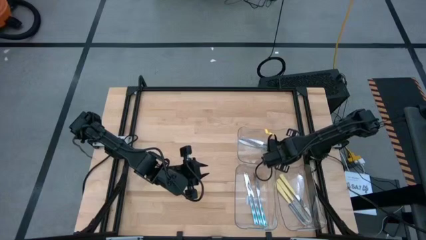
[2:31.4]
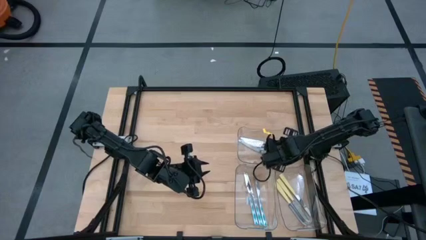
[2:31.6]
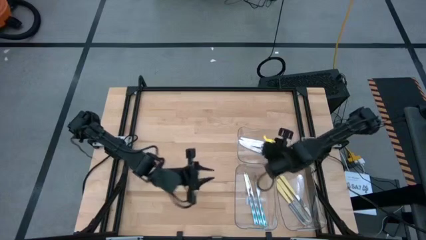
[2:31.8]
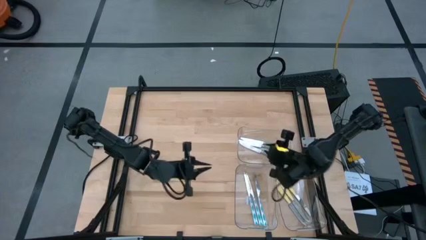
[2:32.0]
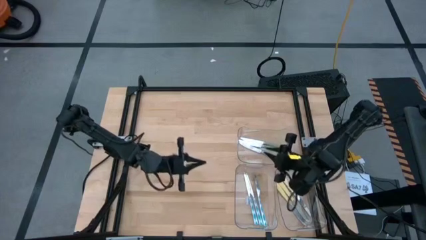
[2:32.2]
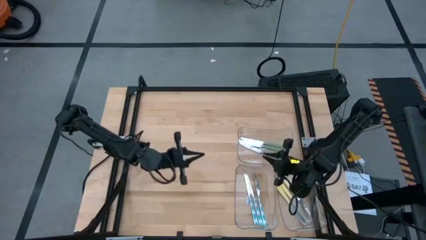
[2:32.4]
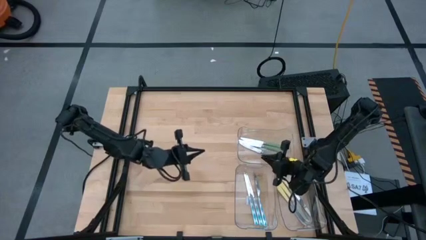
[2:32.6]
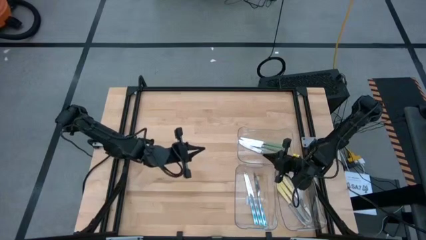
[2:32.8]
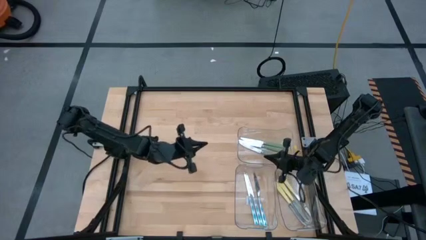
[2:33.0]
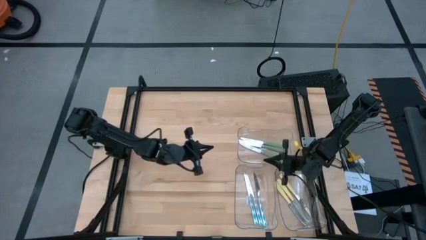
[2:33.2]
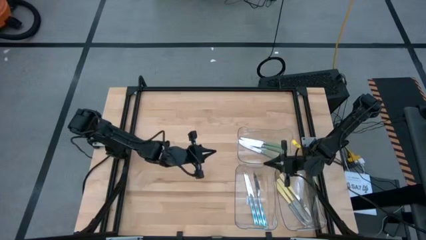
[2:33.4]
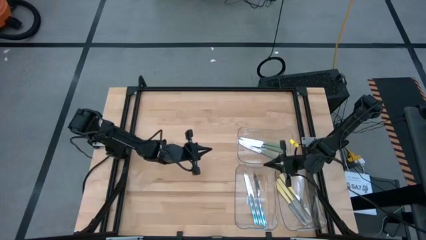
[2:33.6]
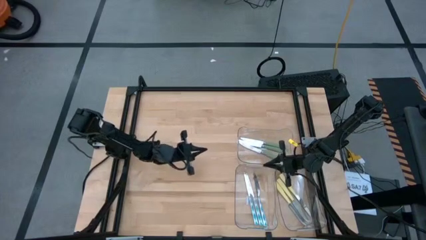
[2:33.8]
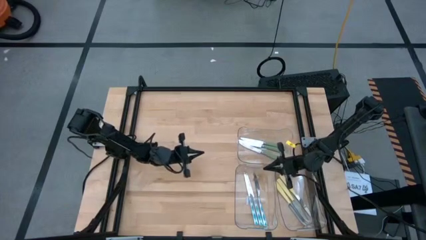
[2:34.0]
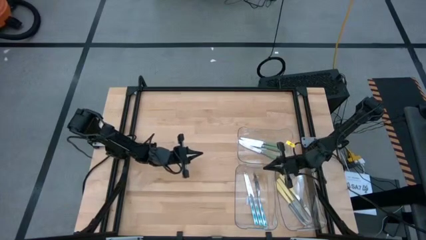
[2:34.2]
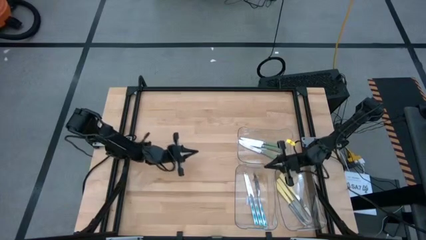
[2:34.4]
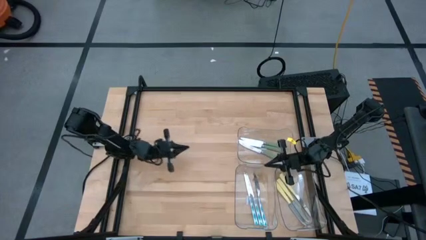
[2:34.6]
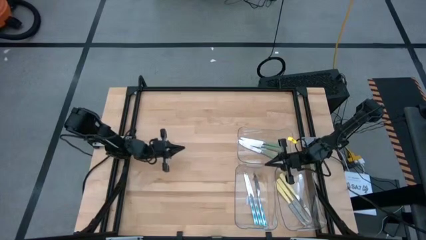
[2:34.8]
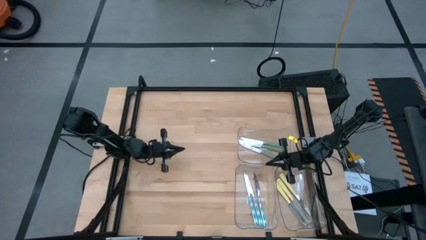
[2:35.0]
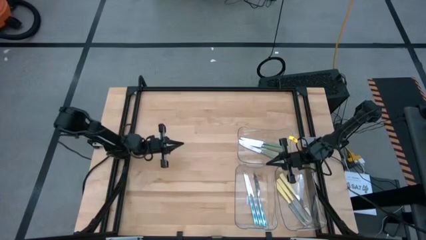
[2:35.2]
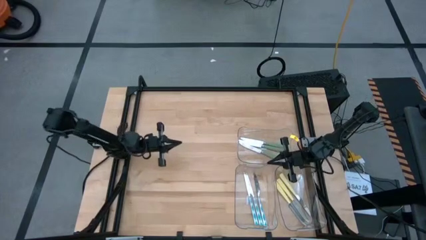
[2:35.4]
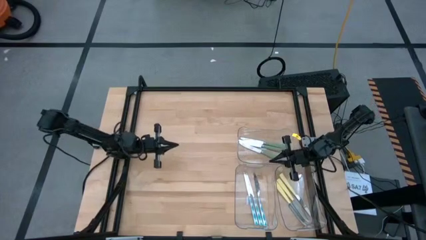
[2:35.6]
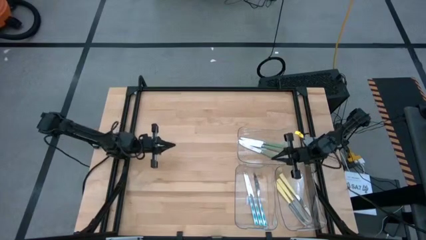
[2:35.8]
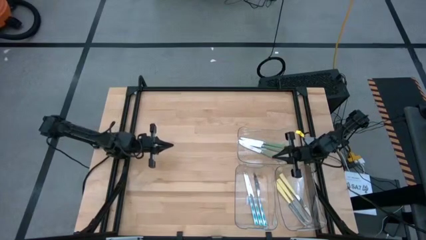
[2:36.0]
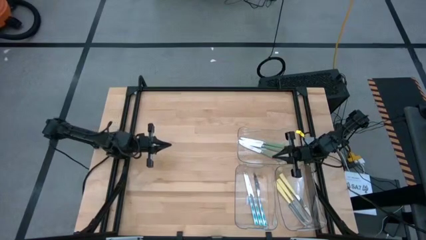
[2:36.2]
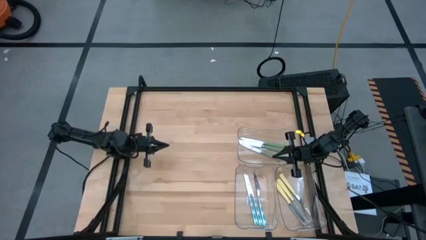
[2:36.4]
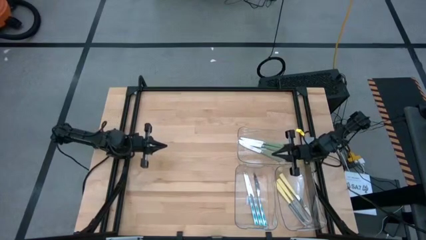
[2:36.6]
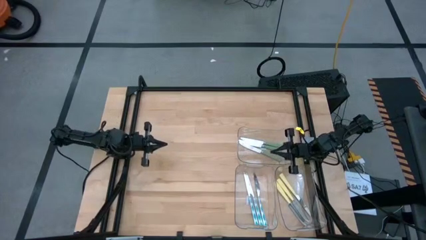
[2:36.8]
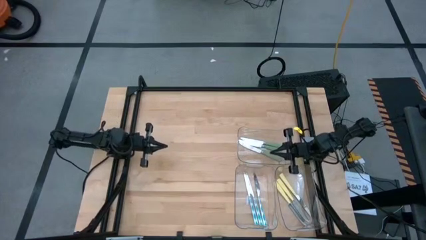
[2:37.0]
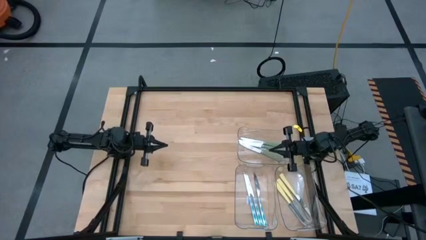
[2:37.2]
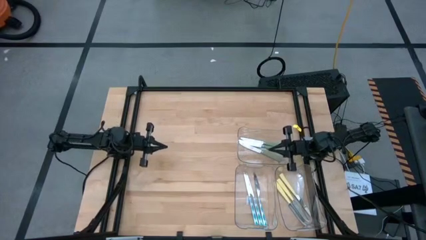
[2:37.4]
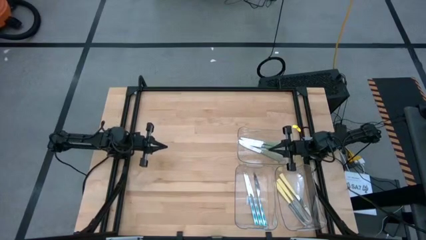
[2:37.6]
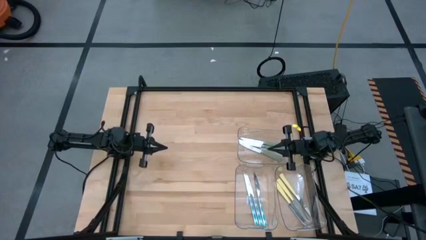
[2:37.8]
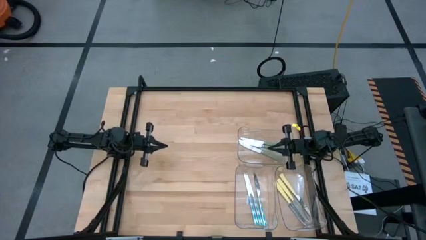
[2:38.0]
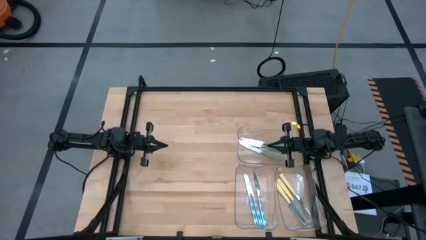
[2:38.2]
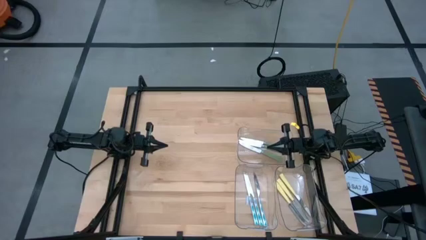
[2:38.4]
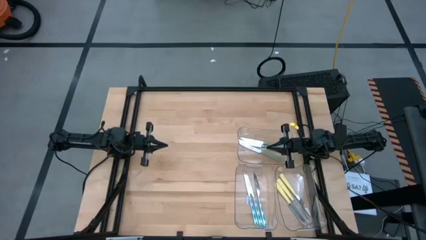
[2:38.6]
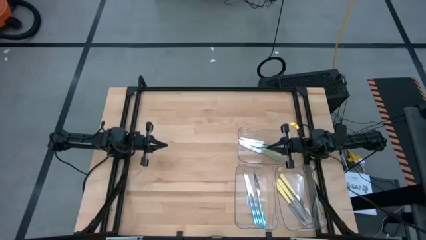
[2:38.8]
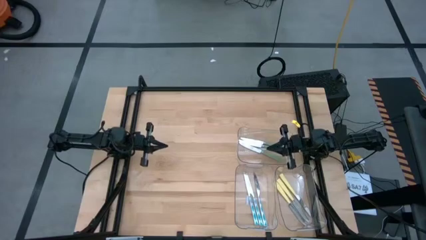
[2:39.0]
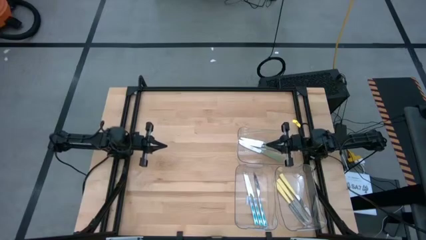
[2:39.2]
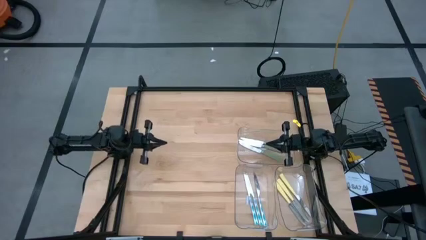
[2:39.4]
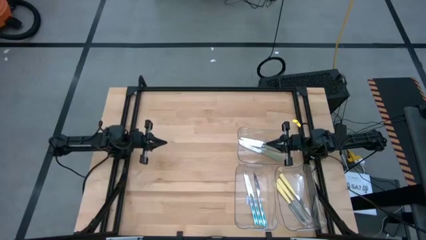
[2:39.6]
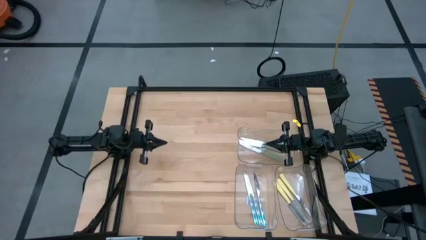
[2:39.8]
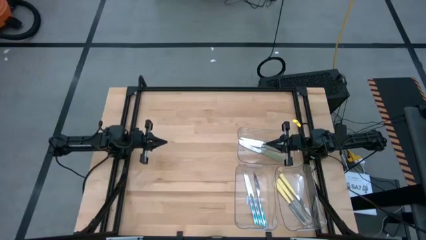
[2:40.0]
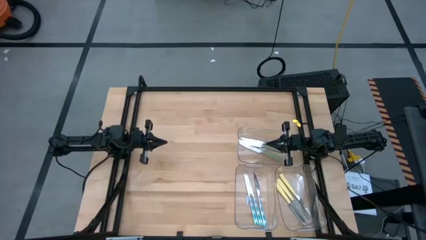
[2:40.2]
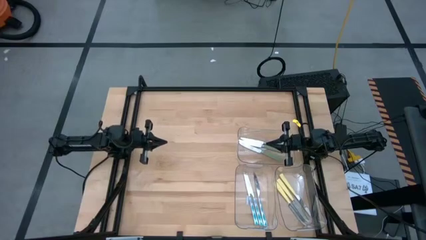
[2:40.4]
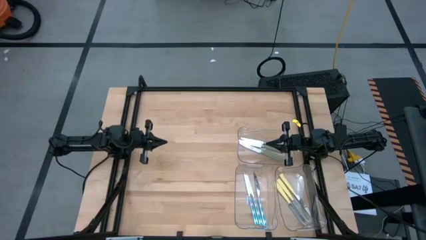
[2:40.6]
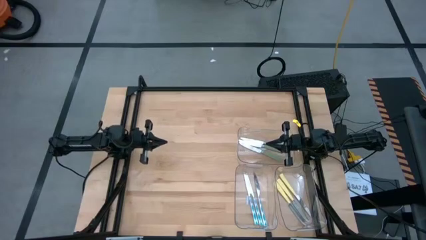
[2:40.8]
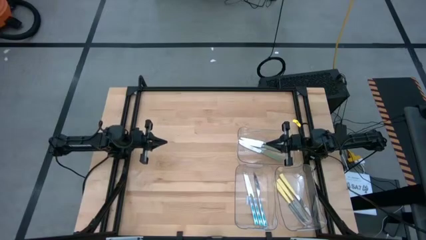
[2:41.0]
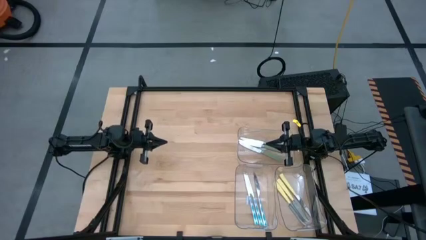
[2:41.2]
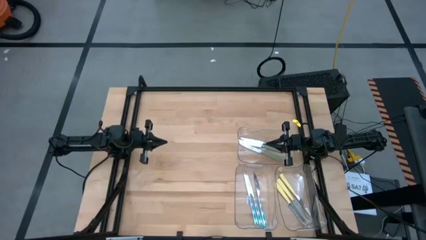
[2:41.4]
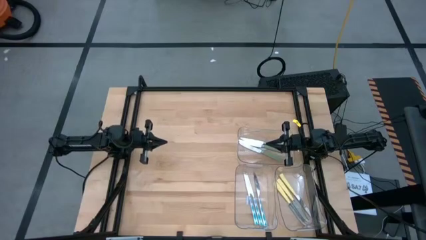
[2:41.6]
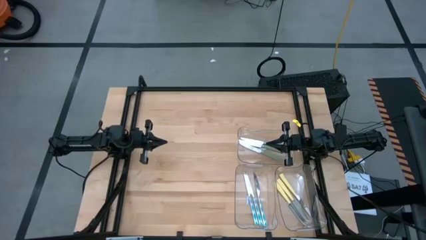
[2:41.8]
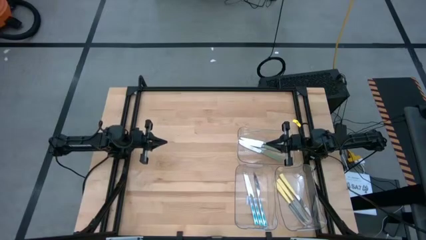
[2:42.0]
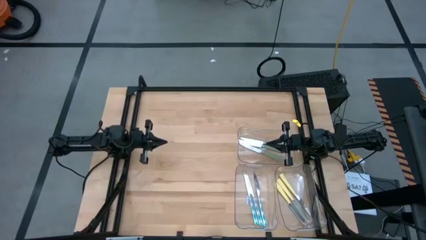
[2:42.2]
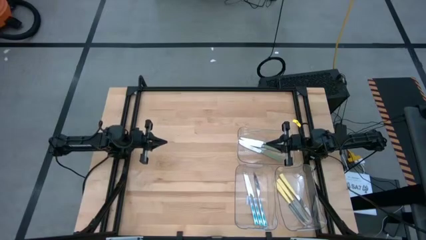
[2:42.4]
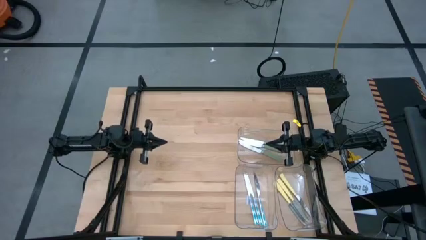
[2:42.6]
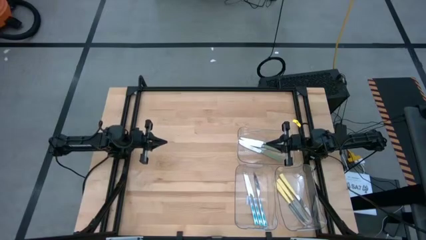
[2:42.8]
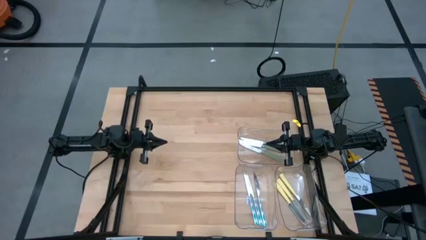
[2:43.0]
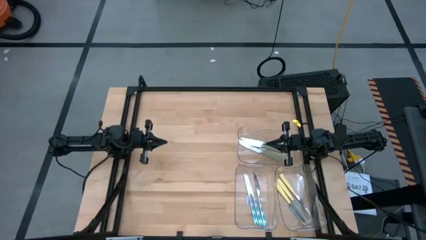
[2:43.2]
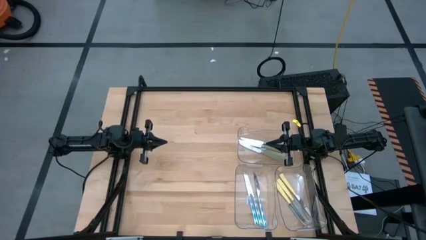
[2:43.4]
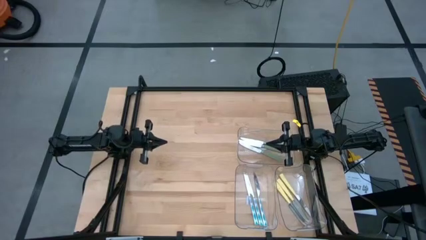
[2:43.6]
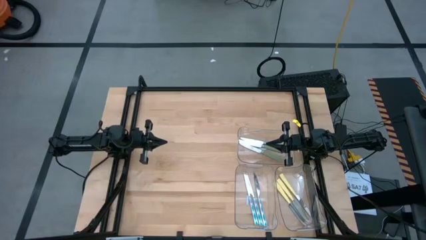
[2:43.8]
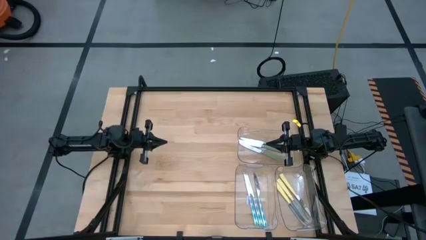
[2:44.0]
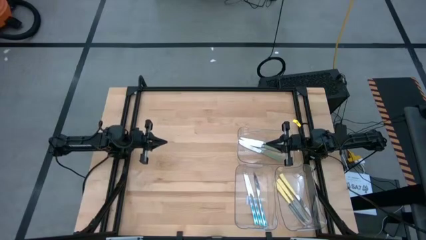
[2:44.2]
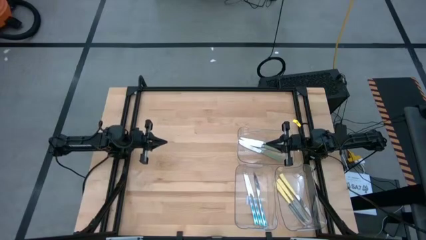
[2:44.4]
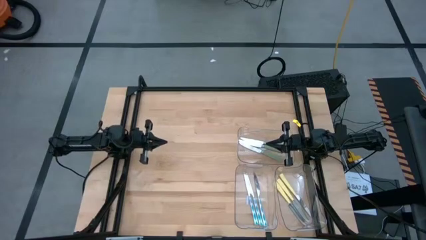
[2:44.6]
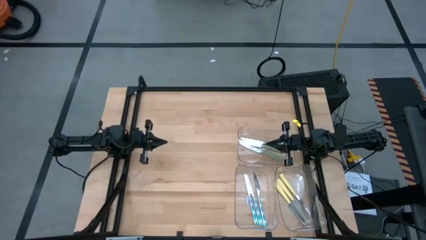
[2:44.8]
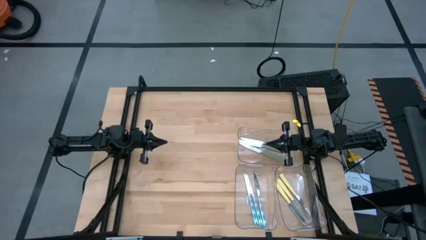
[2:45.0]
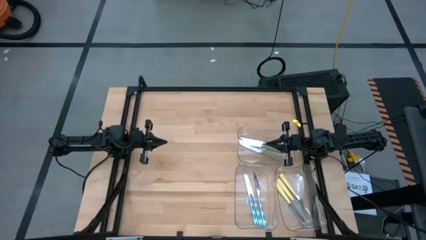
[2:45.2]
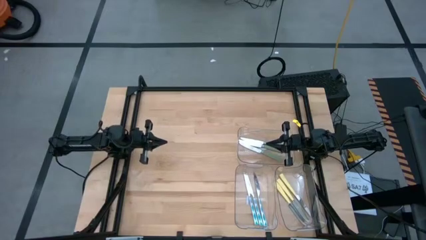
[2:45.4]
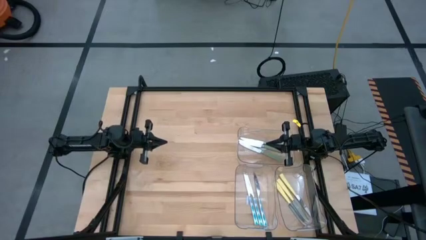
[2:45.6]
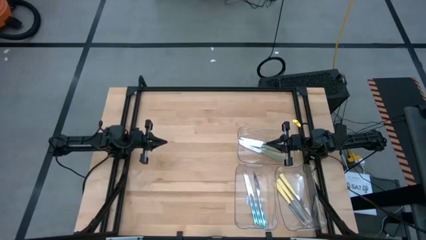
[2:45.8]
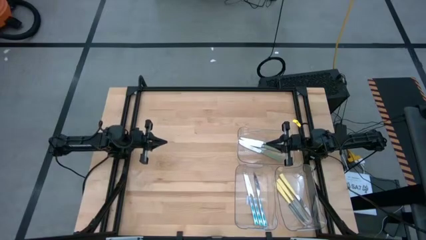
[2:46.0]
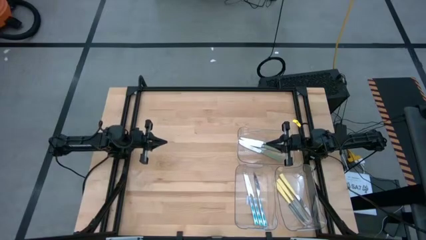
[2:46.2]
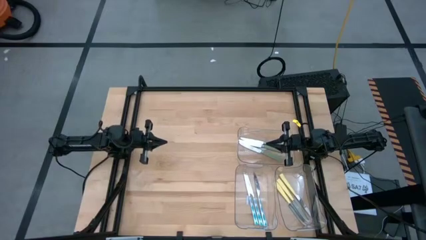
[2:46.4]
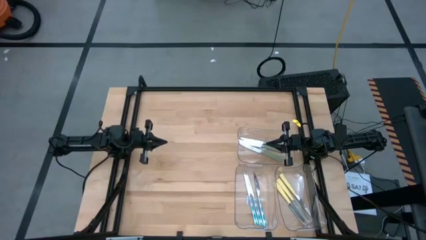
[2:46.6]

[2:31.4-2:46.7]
Task: Sort silverware by color (type)
Return to Home Position

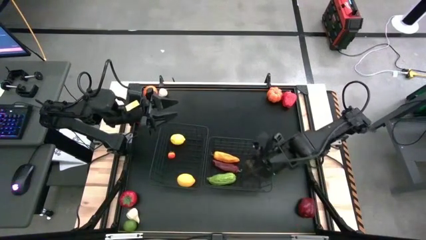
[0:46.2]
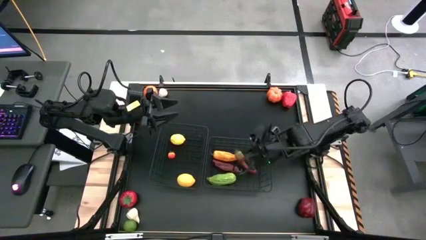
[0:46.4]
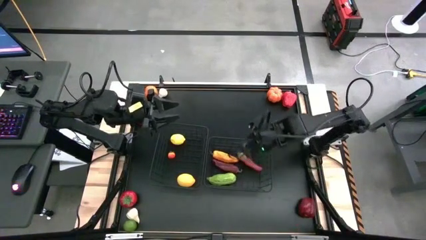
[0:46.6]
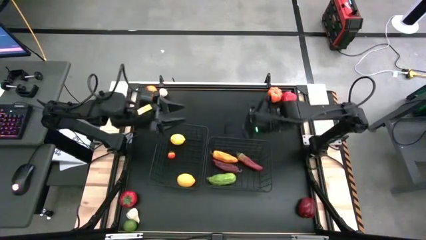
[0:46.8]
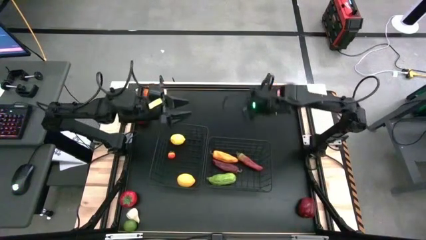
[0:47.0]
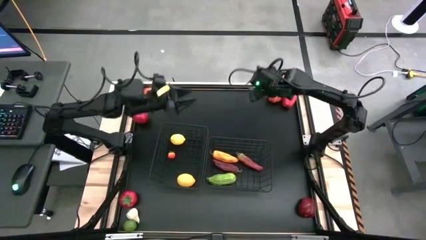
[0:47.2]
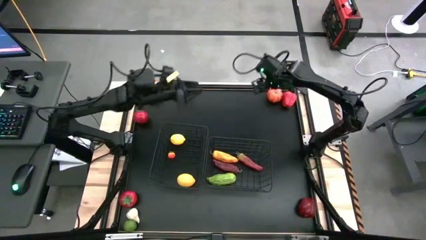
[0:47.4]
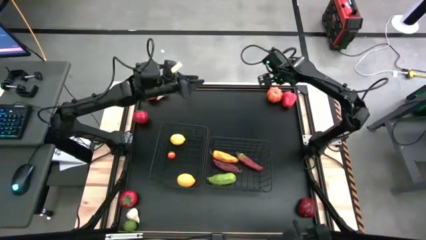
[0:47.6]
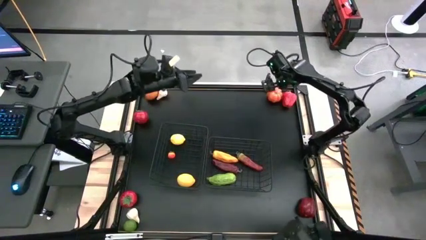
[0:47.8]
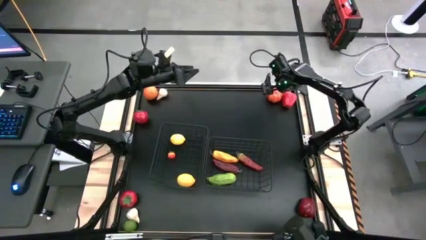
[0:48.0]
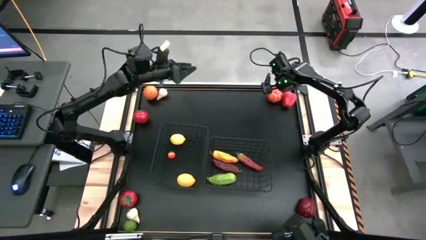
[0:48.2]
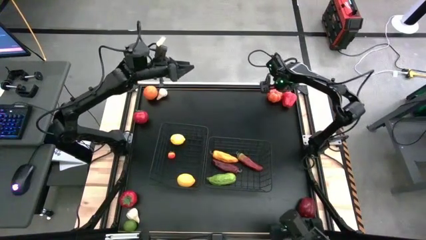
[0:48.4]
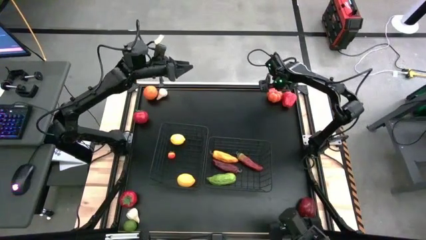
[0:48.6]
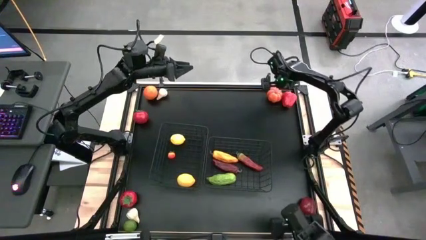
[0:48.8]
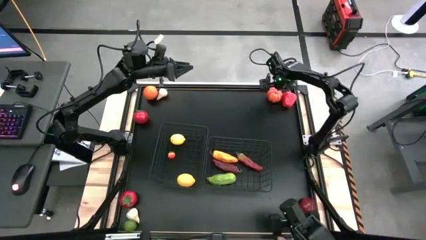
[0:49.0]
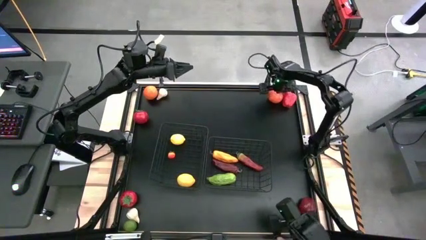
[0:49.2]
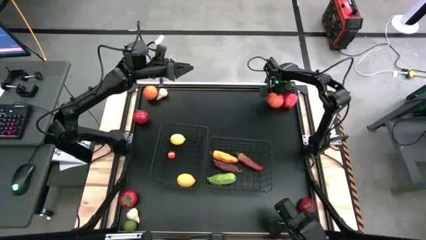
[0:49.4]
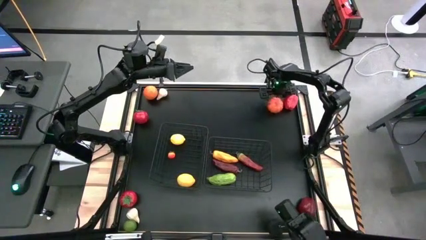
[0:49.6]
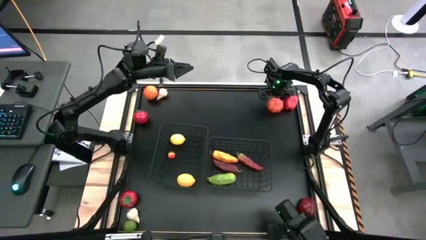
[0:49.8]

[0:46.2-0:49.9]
Task: Sort produce into baskets
Put the orange pumpkin into the right wire basket
